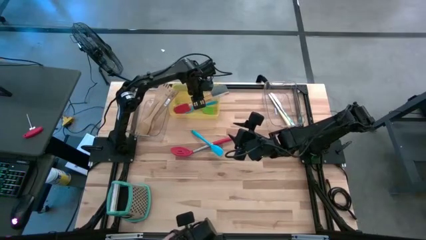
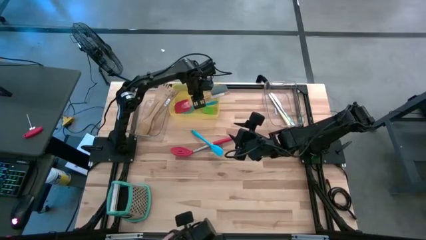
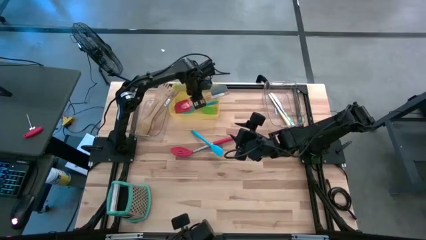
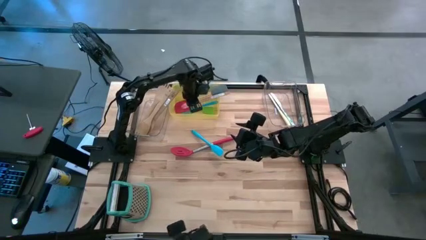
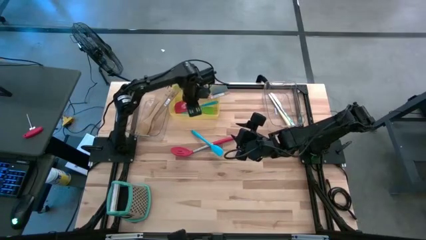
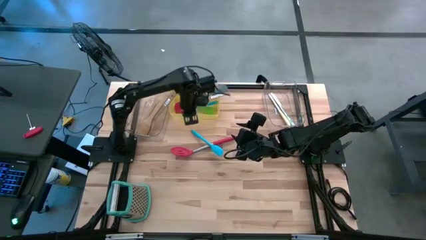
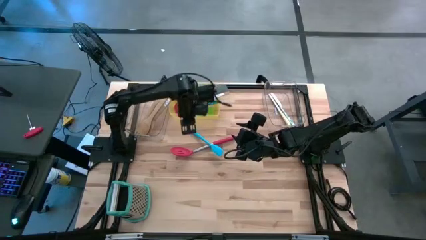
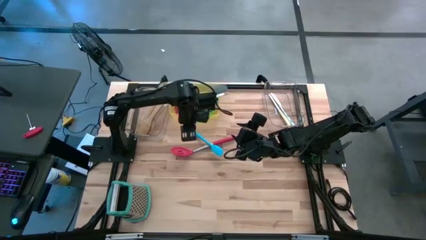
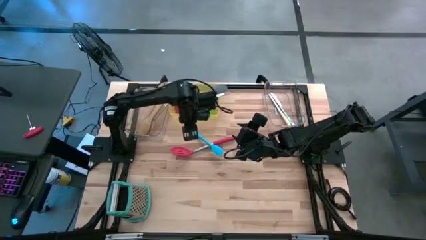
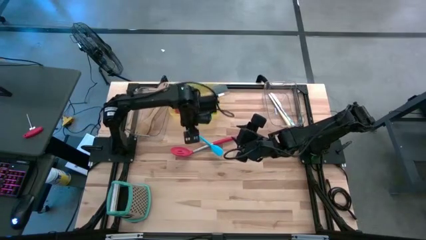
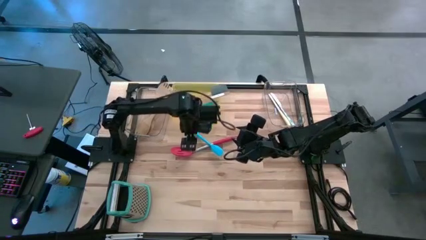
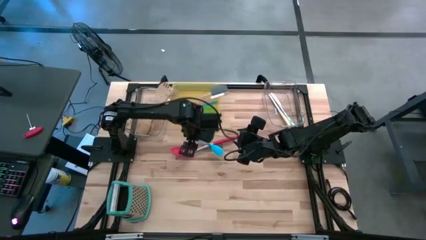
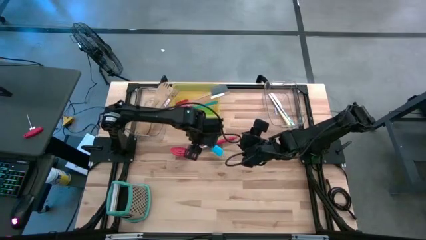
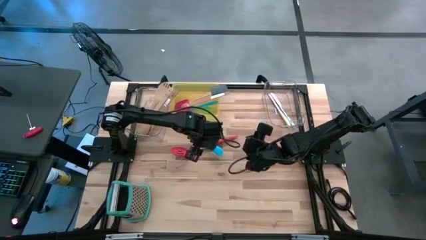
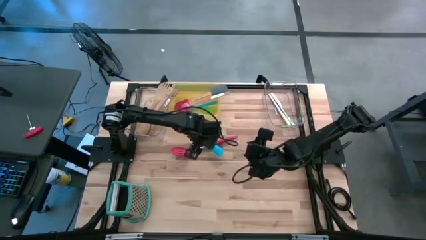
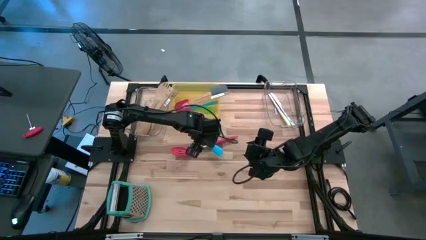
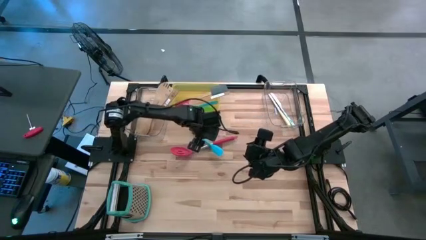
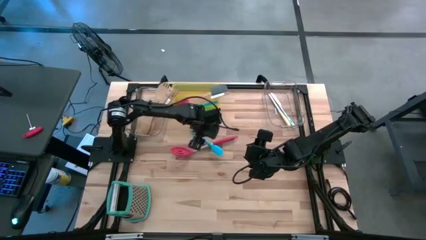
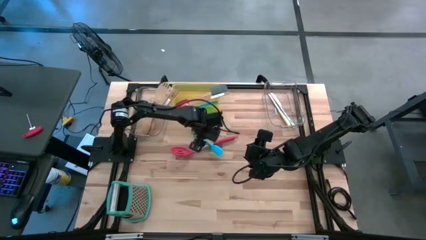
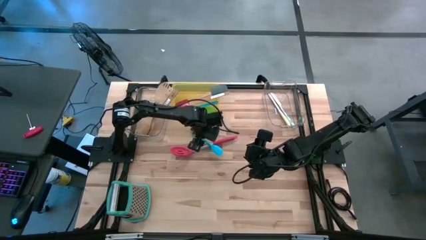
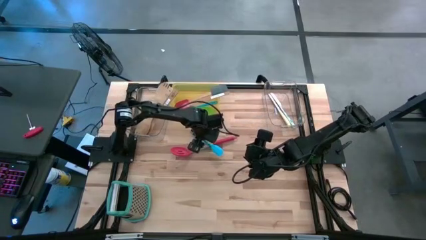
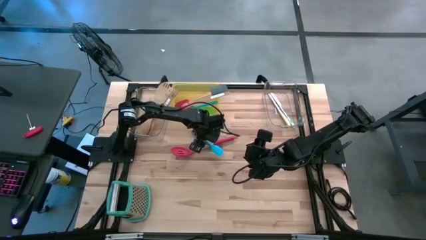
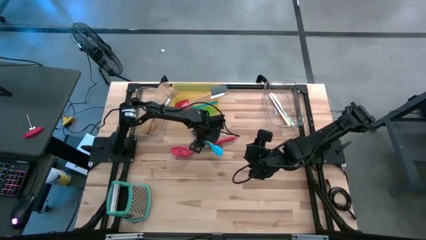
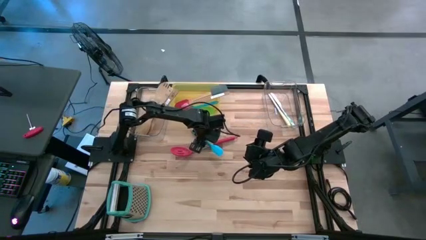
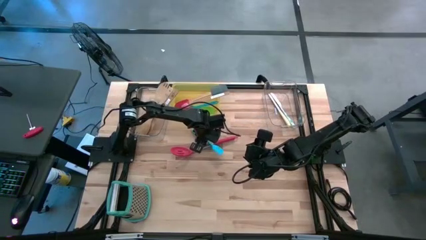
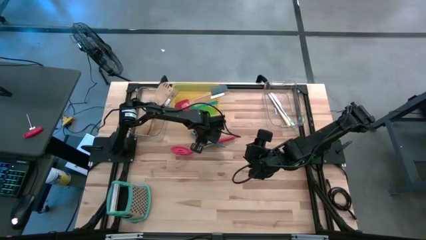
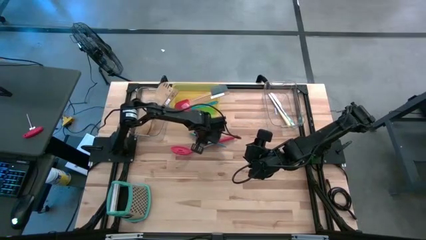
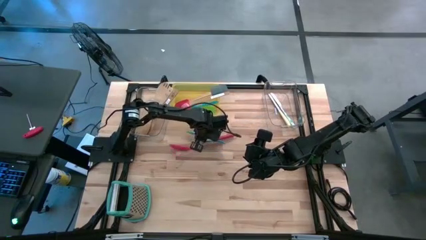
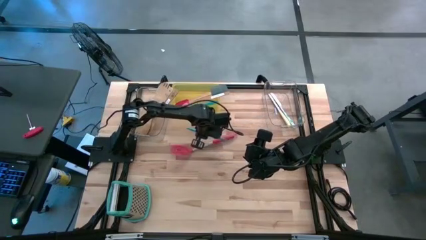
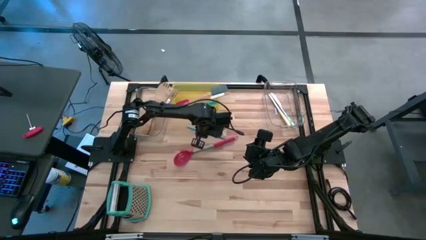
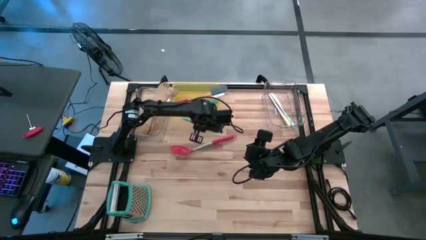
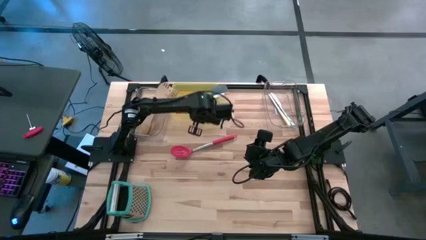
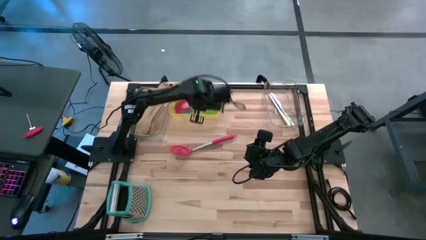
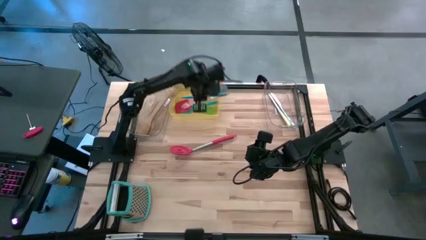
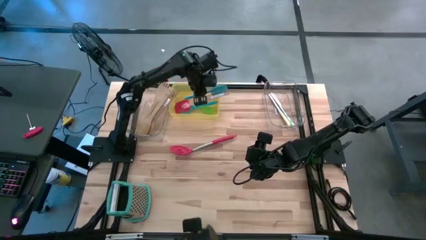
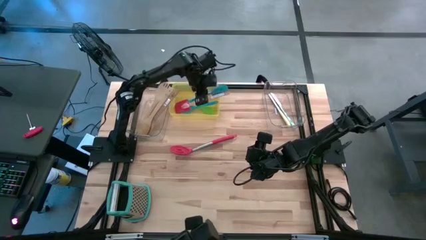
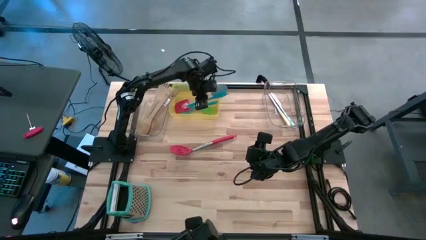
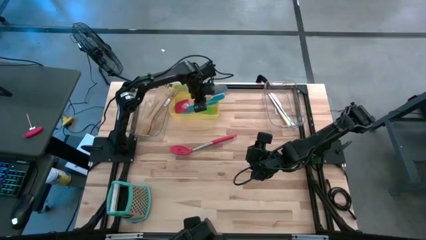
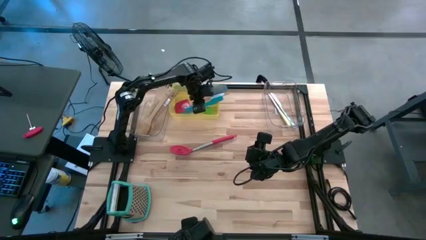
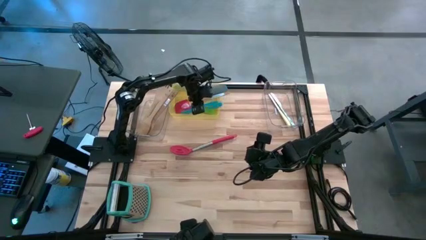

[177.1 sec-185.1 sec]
Task: Pick & Place Kitchen Items
Put the blue spatula into the yellow bin

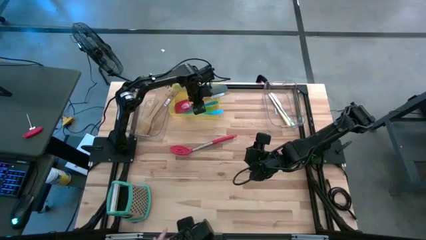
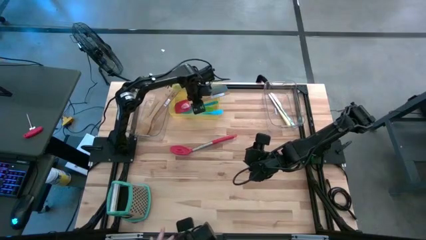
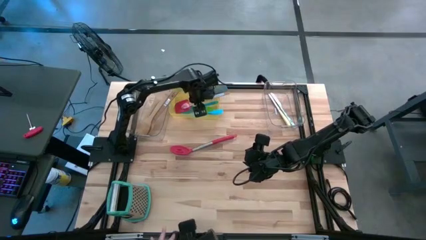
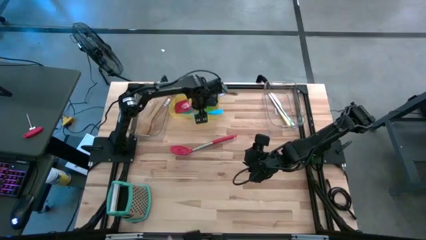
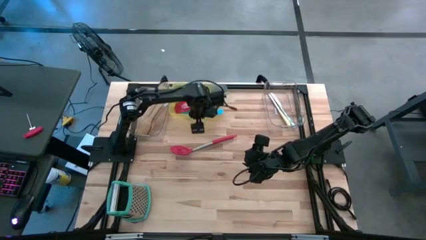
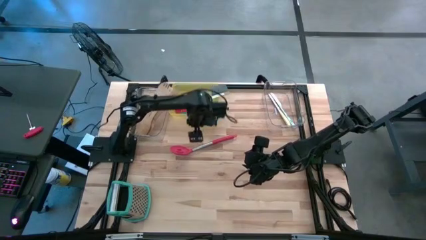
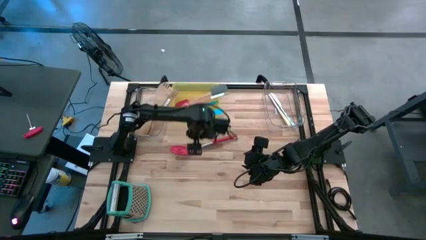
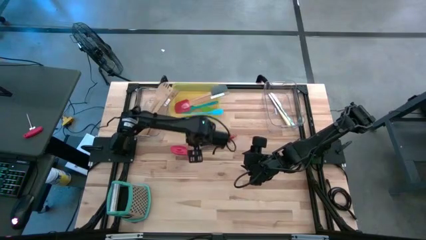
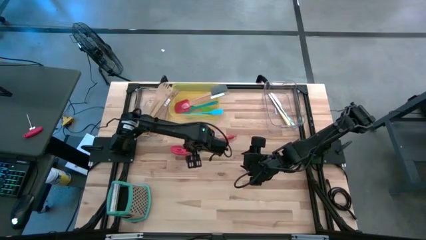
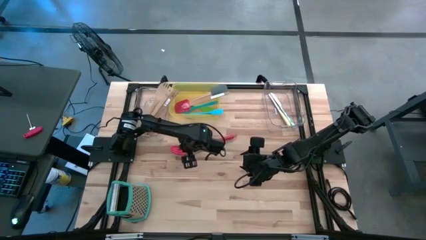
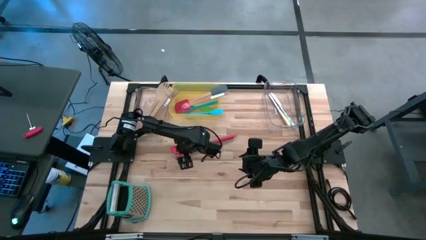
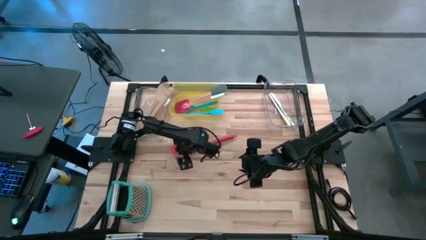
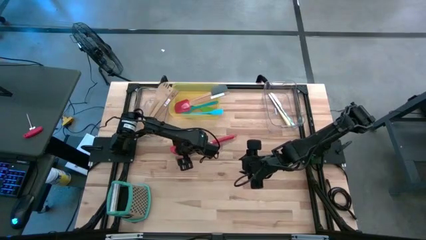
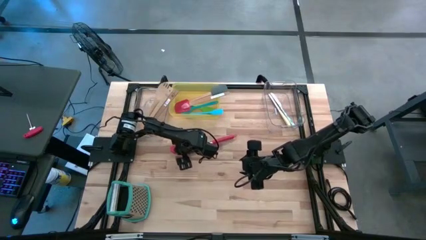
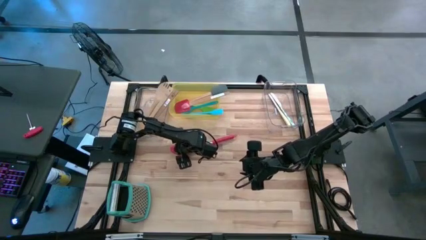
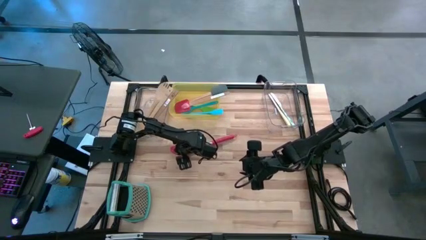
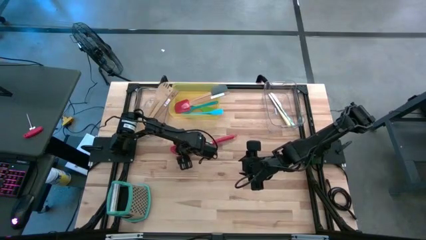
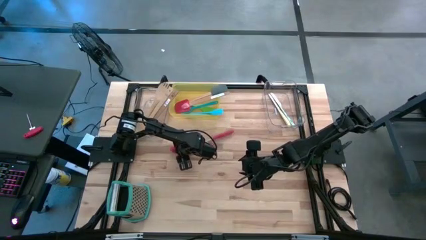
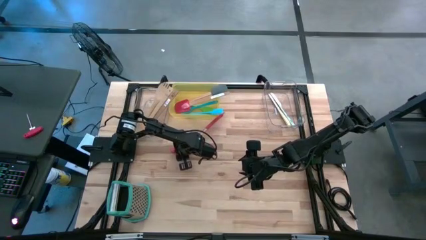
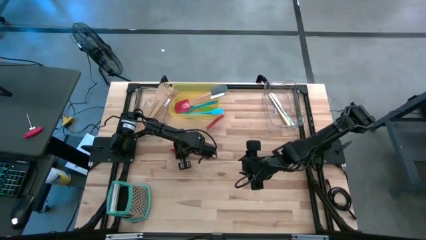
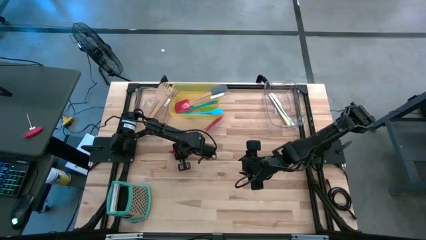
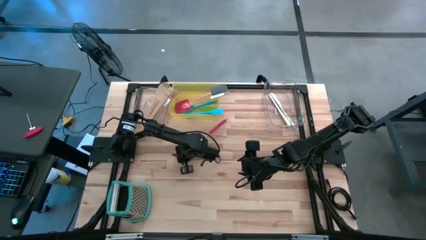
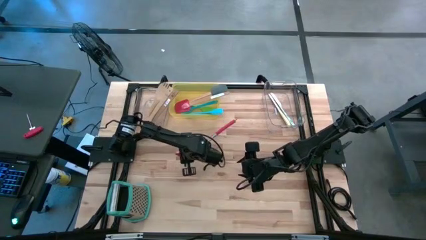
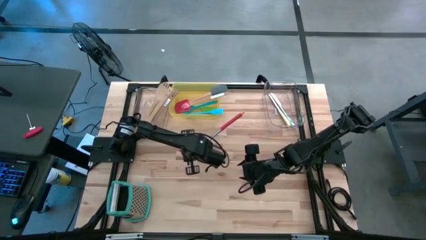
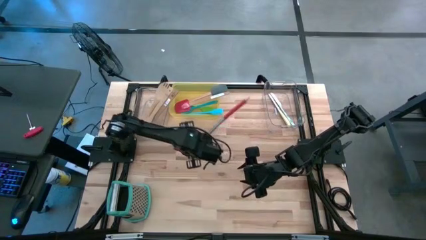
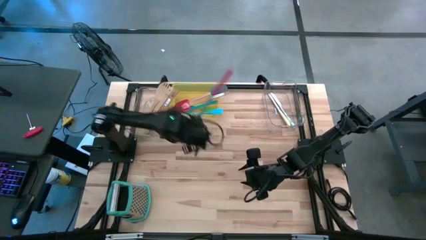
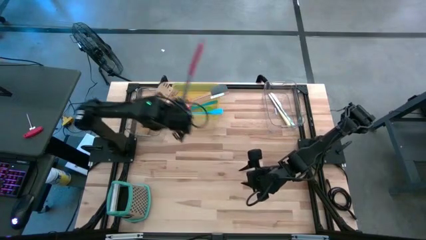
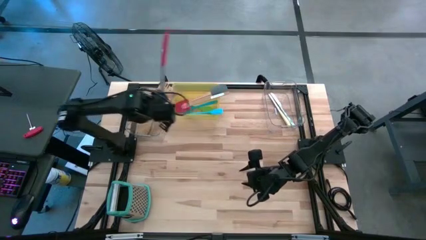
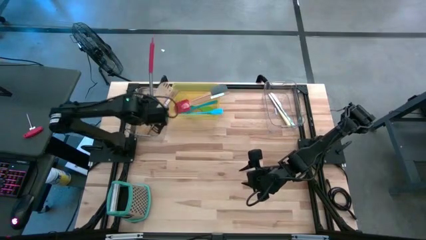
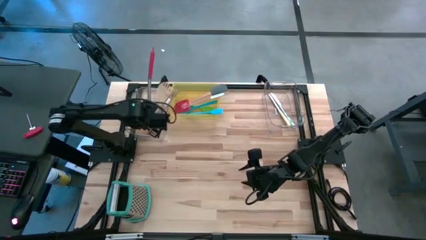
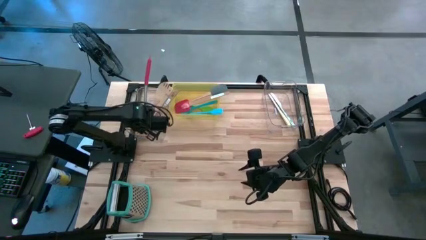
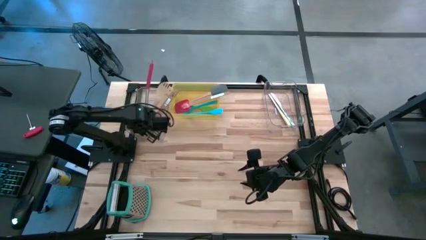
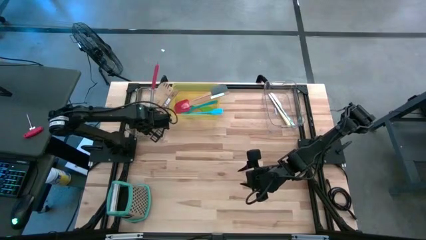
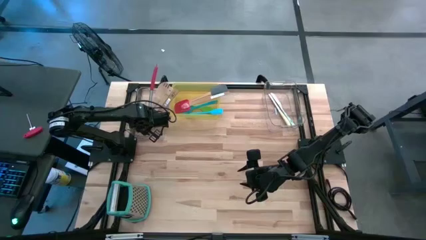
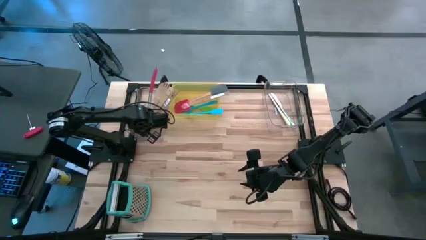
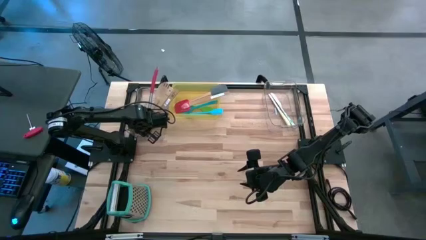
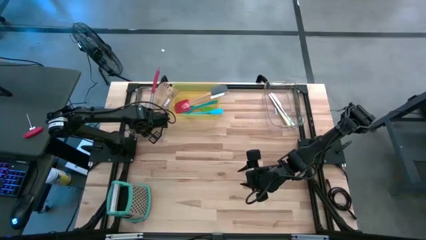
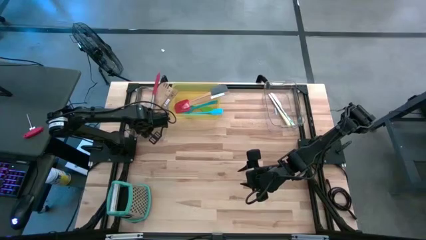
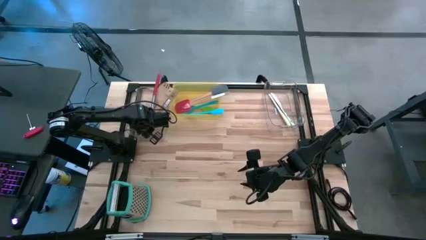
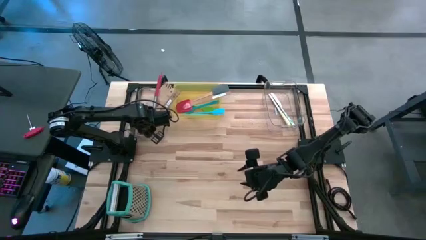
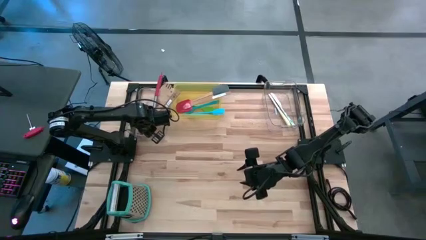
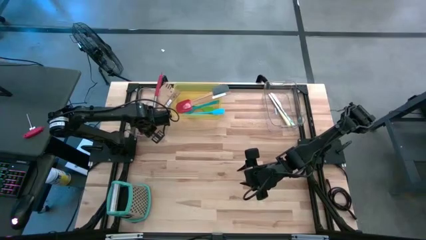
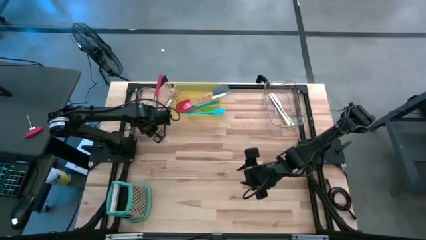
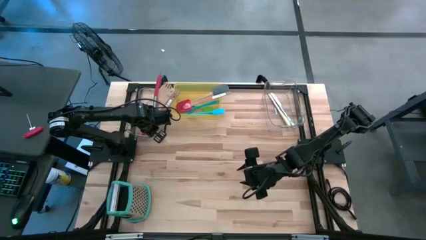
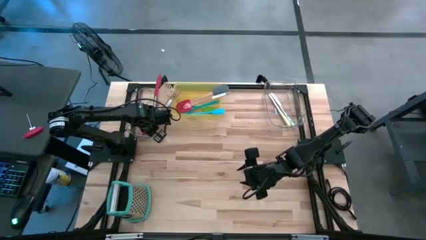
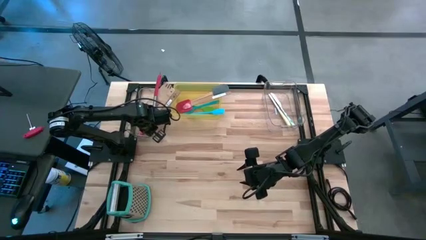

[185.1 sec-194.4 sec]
Put the red serving spoon into the left transparent bin
